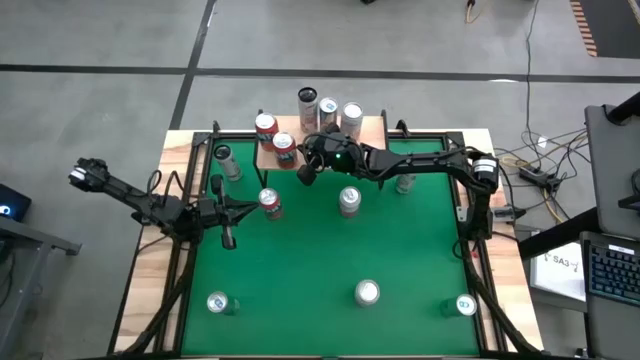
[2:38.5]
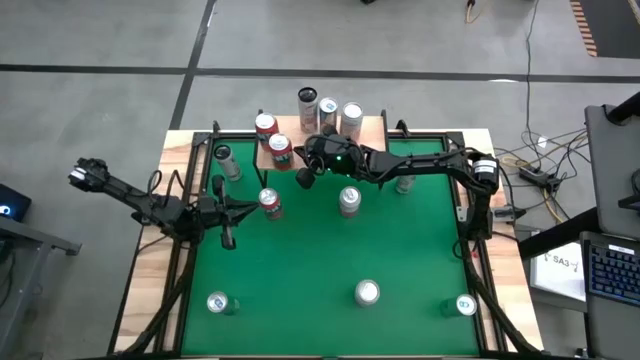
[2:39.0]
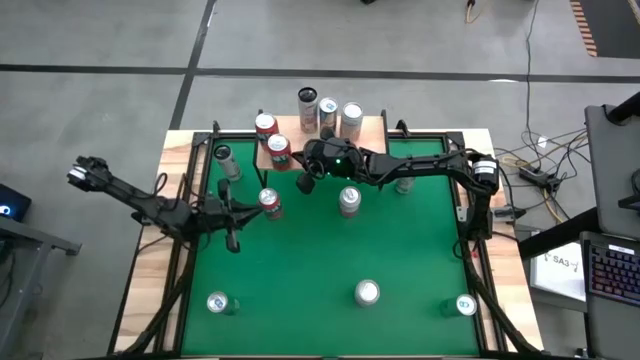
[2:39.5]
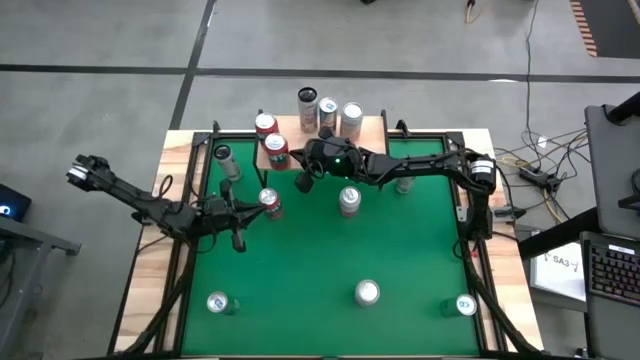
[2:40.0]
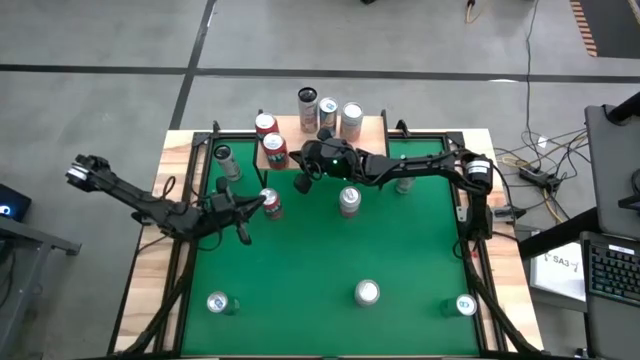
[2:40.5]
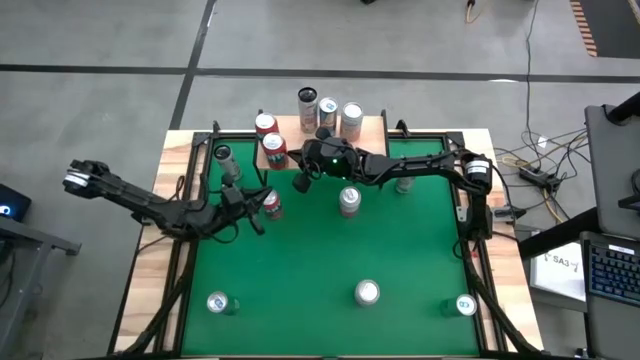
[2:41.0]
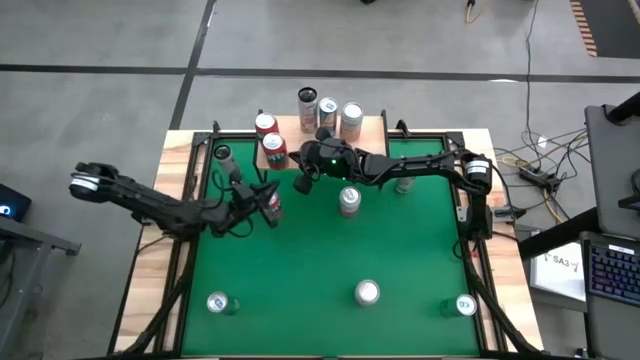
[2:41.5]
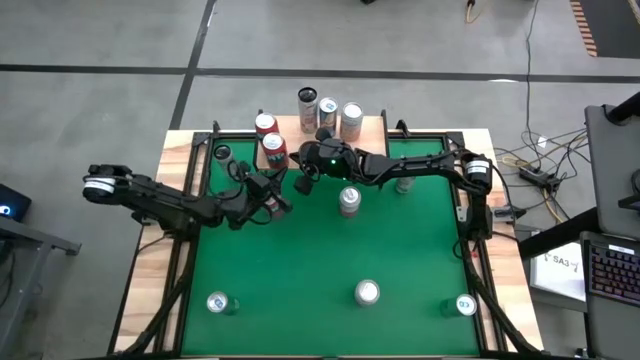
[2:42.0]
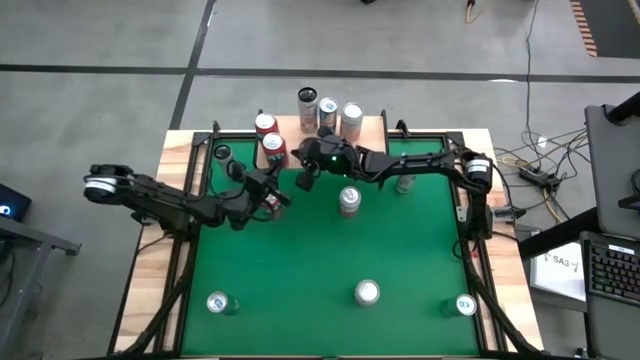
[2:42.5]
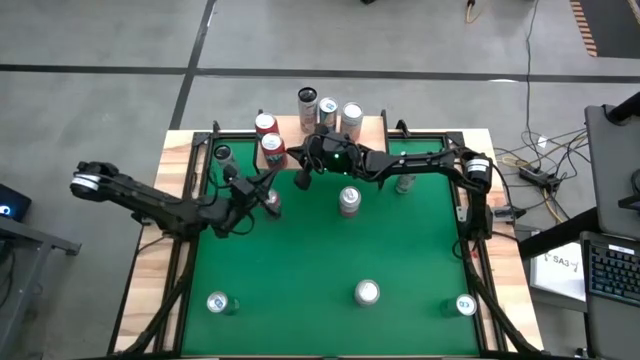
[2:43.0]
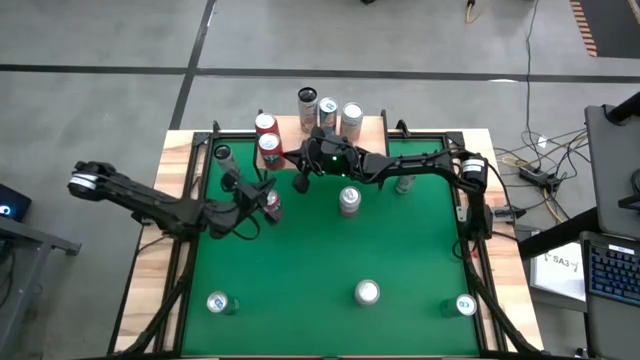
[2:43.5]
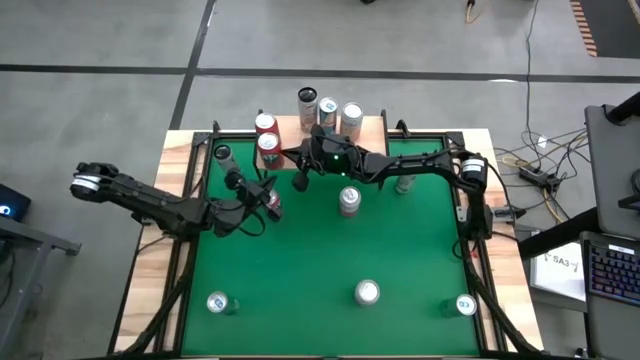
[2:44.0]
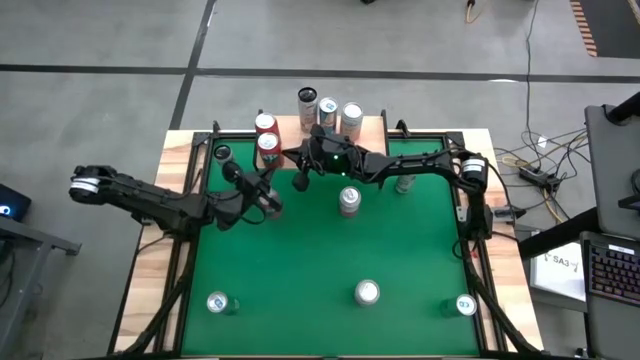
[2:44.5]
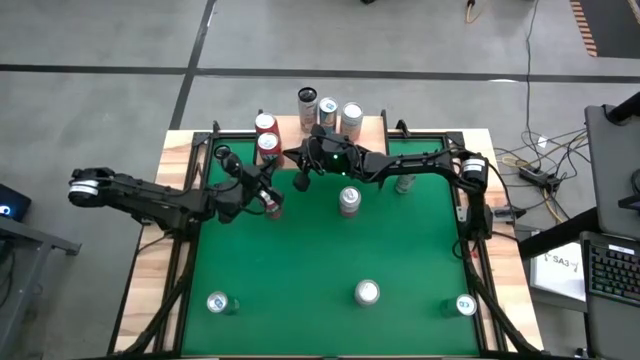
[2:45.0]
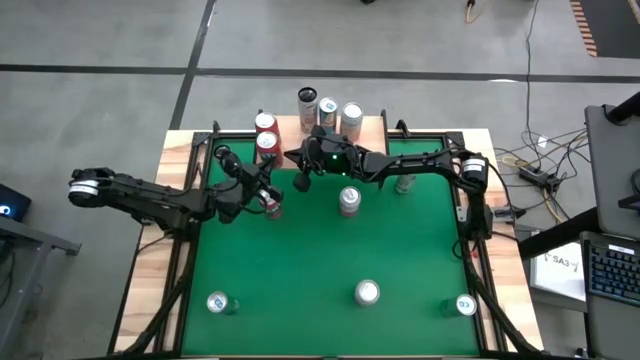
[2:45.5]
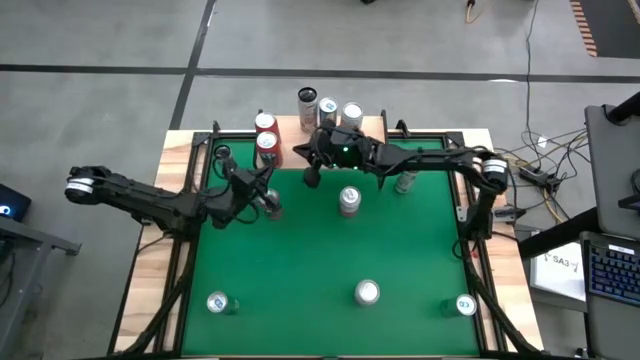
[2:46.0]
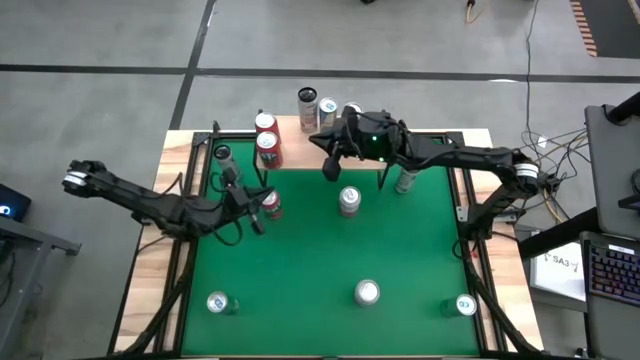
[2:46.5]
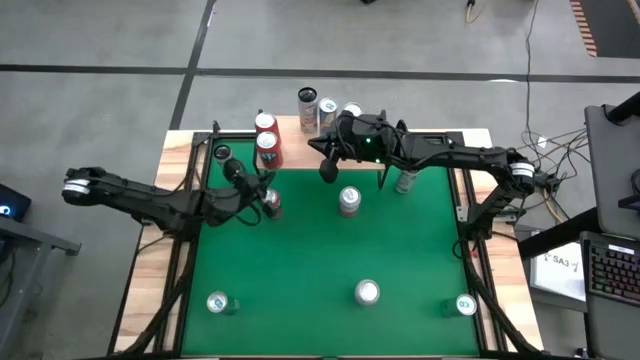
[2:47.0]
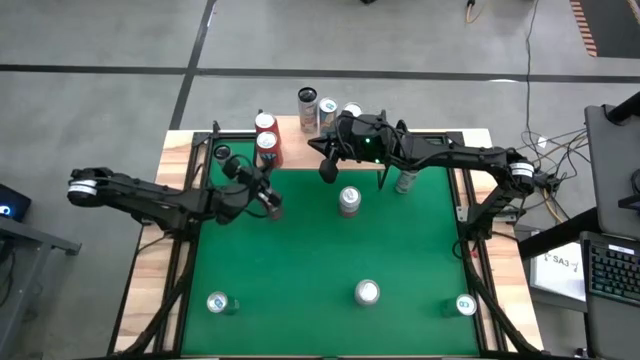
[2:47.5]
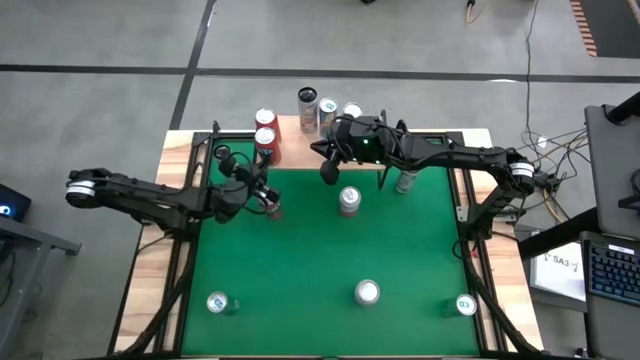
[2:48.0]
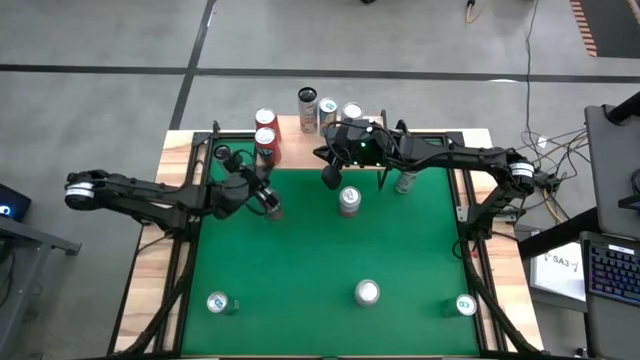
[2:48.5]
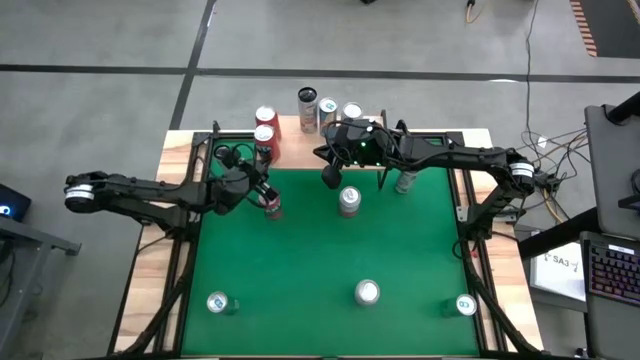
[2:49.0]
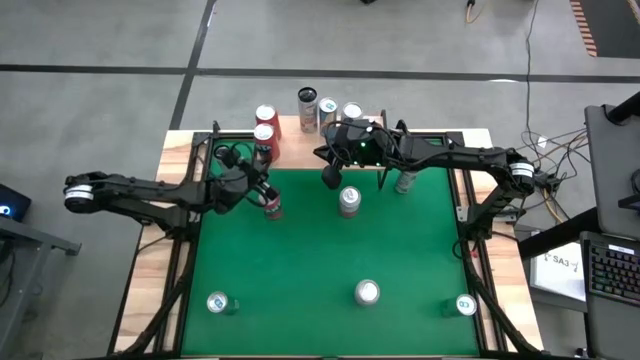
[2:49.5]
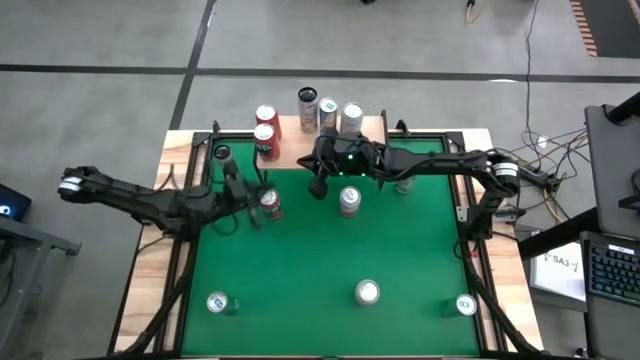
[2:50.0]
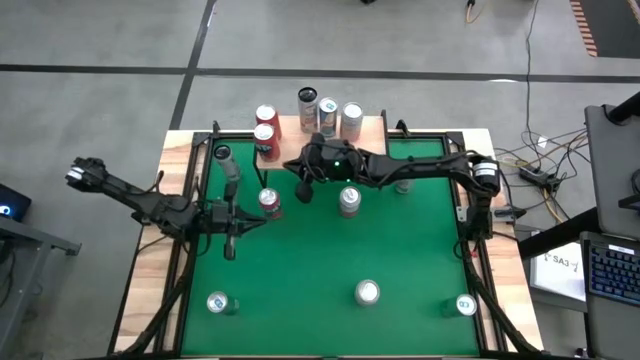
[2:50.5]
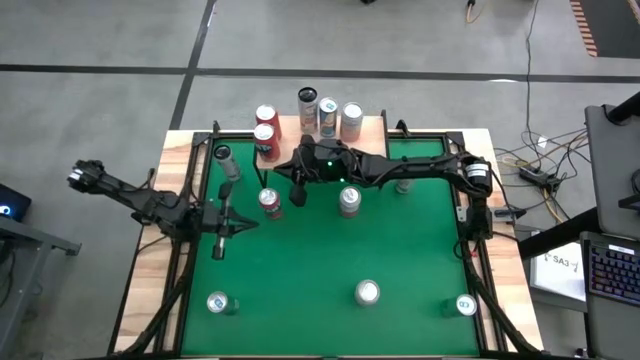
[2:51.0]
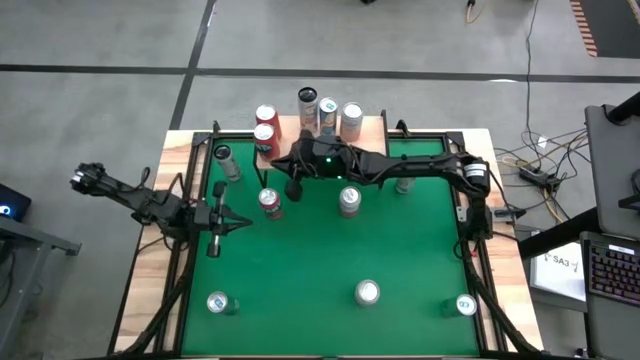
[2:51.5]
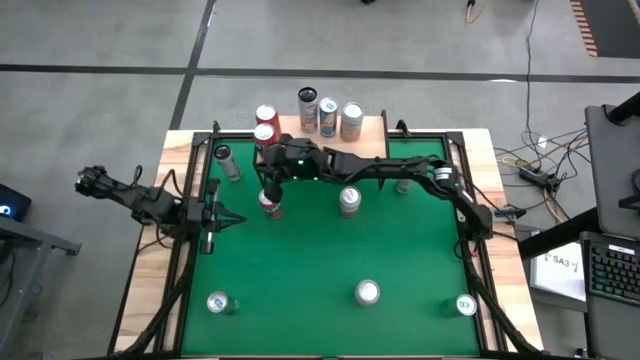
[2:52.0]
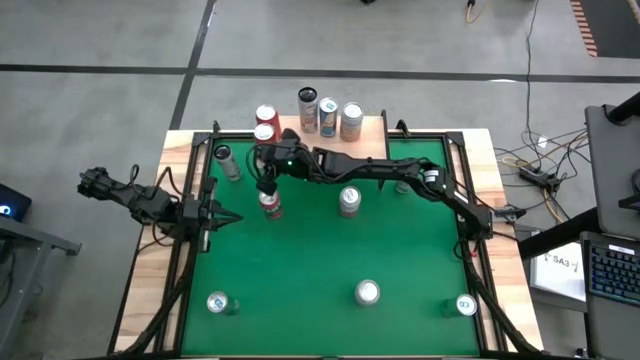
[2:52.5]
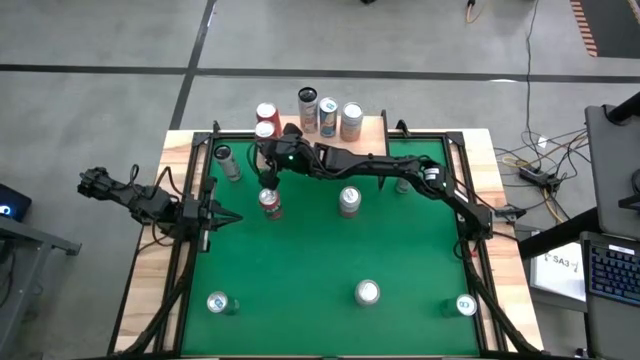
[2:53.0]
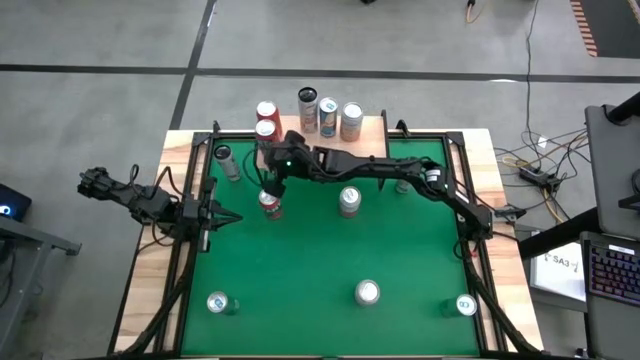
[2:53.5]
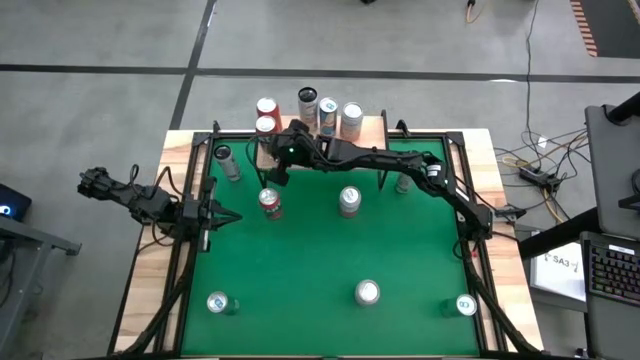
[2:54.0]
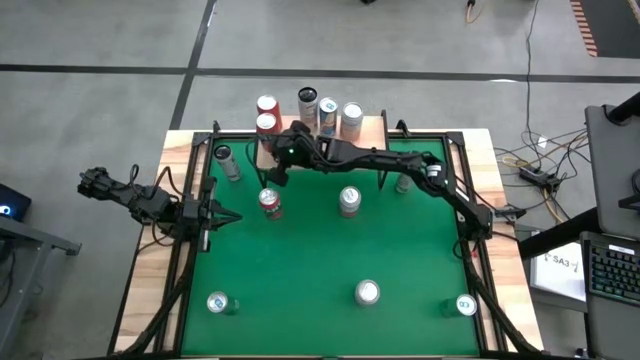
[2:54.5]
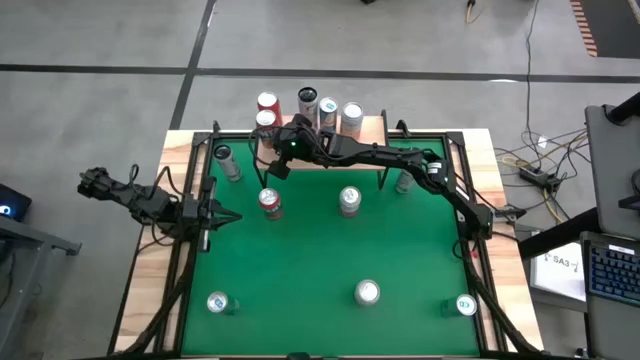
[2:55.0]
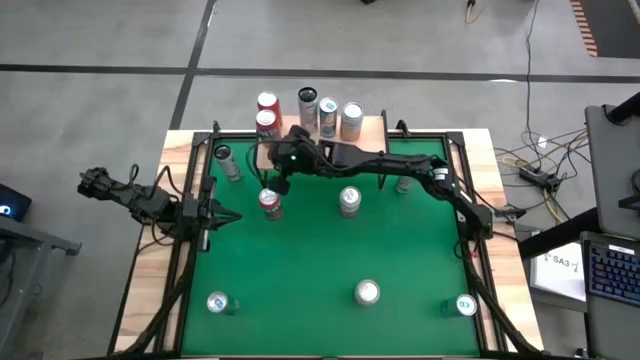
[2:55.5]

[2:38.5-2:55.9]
Task: Place canned beverage on shelf
Put the bottom orange soda can on the shelf aligned with other orange soda cans

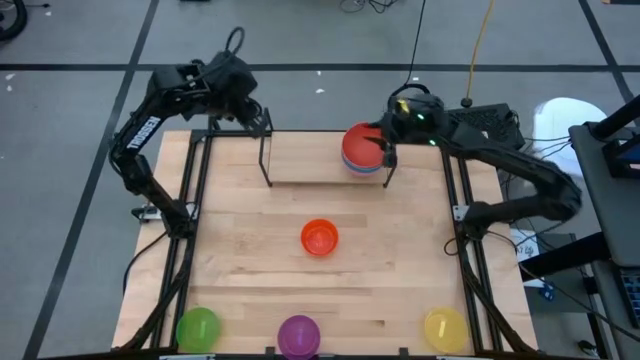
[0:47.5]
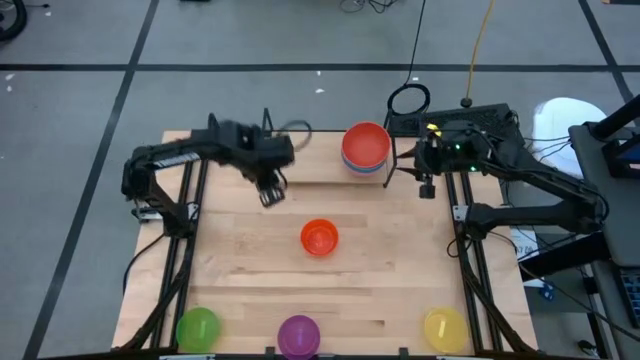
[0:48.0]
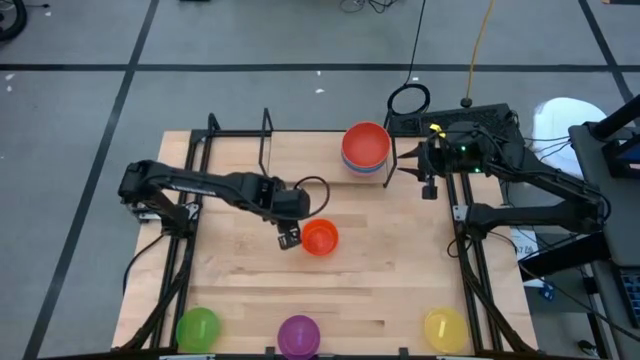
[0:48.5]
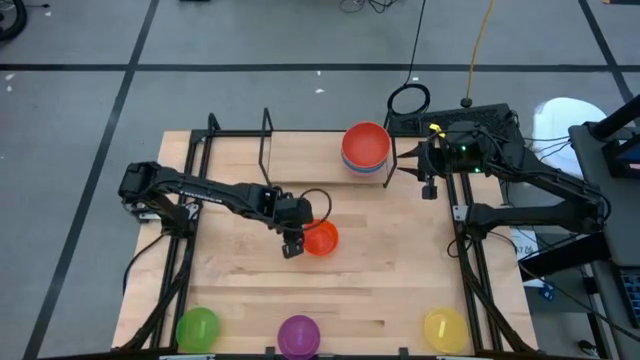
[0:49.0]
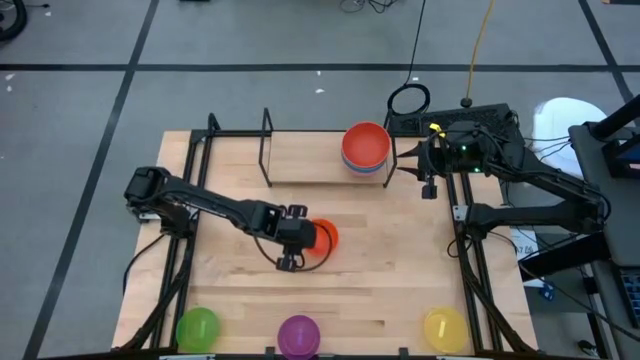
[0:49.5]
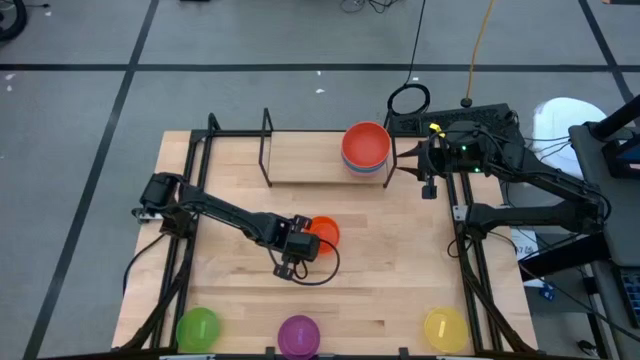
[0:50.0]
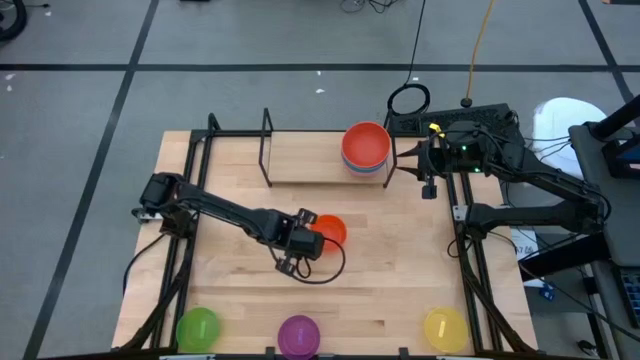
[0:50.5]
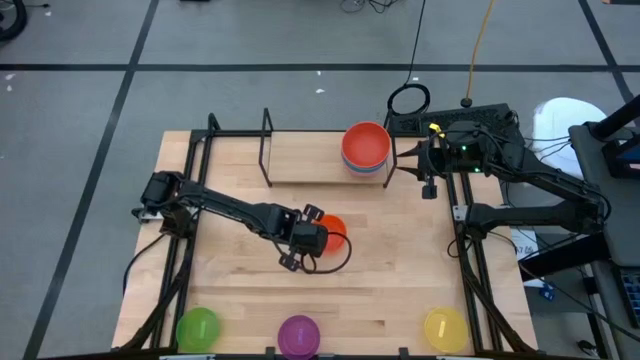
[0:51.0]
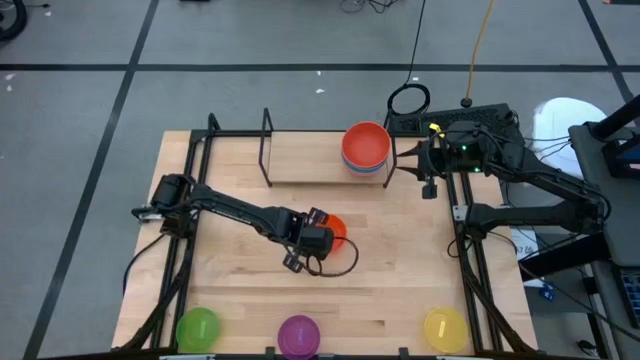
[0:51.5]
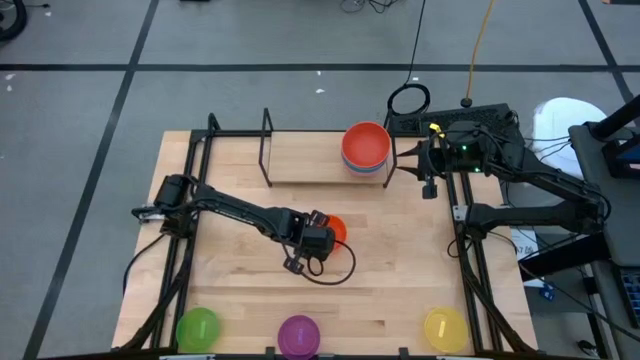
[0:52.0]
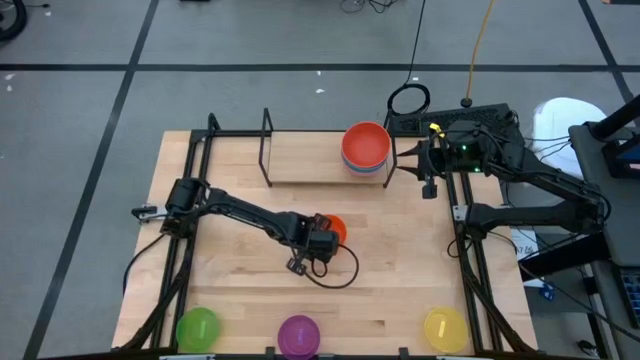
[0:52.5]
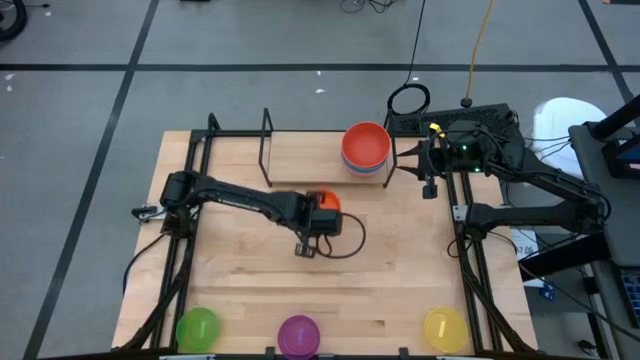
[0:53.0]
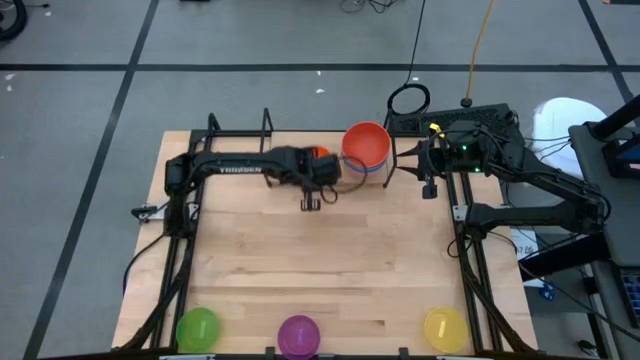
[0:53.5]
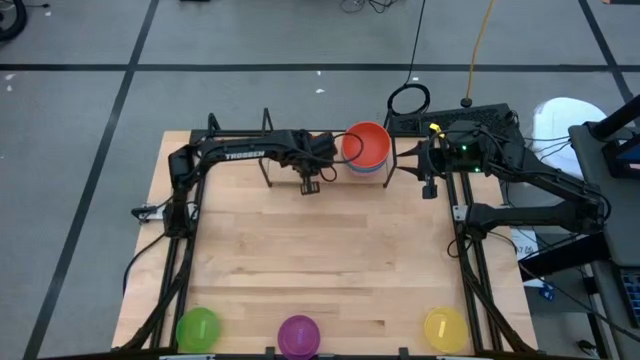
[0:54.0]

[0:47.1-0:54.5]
Task: Place and stack bowls onto a shelf
Put the small orange bowl on the shelf
